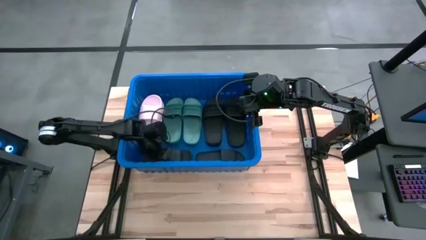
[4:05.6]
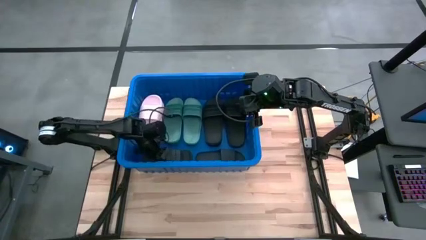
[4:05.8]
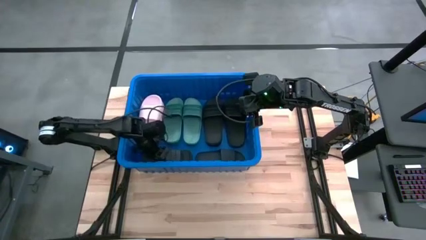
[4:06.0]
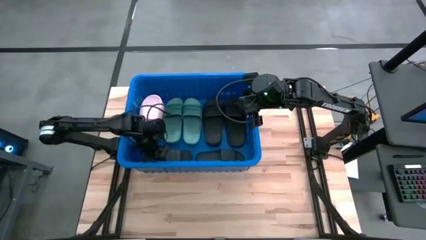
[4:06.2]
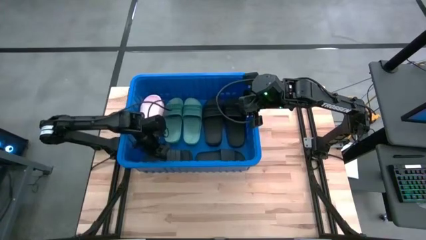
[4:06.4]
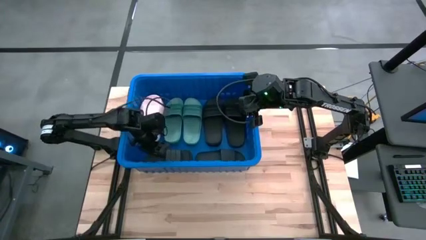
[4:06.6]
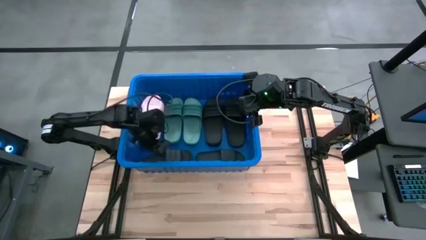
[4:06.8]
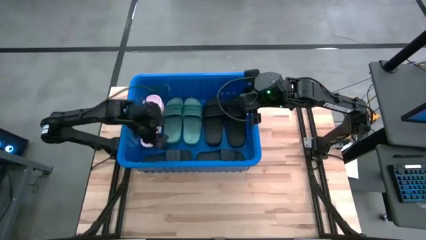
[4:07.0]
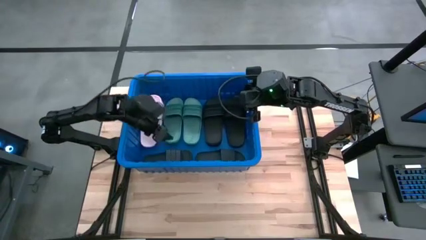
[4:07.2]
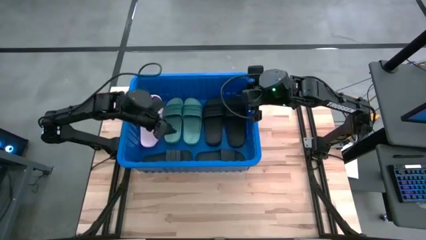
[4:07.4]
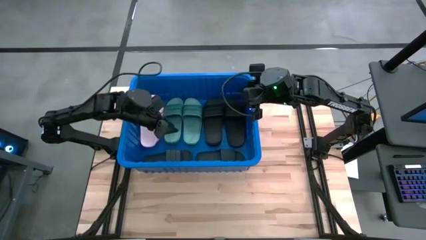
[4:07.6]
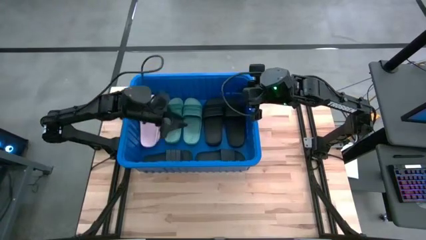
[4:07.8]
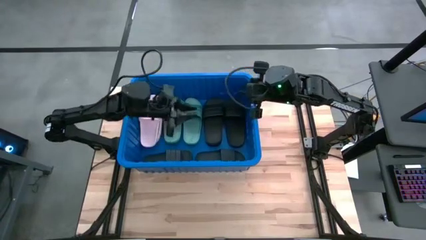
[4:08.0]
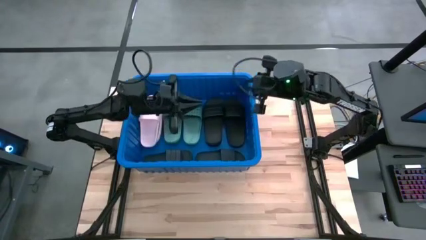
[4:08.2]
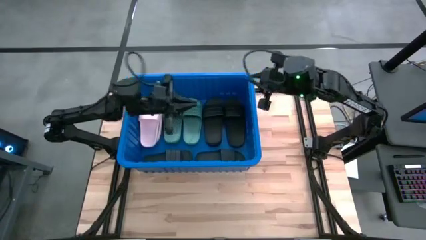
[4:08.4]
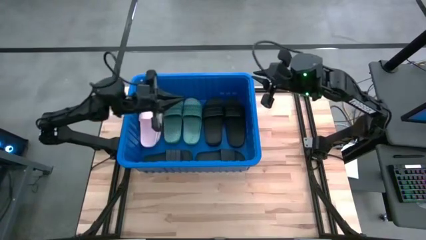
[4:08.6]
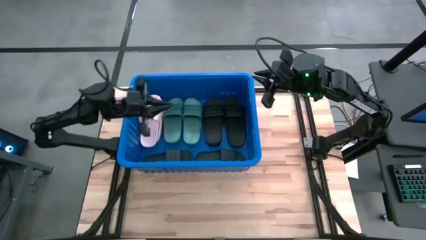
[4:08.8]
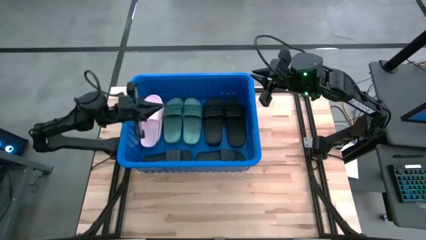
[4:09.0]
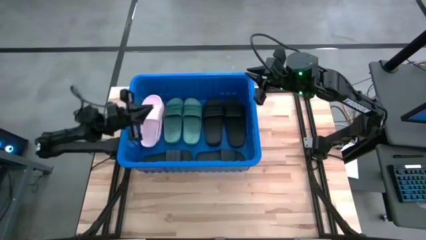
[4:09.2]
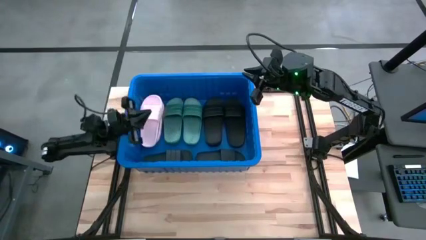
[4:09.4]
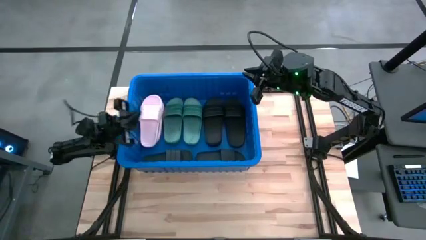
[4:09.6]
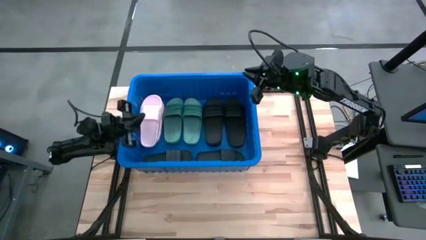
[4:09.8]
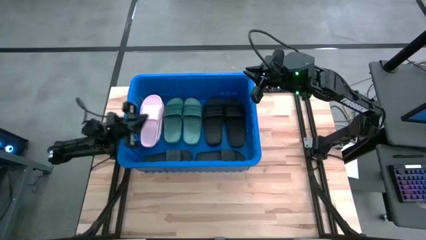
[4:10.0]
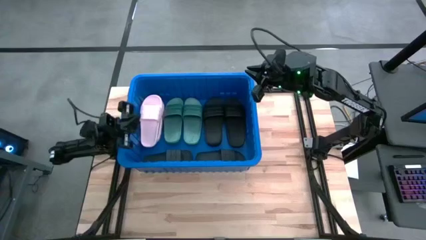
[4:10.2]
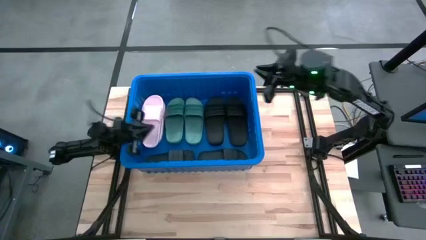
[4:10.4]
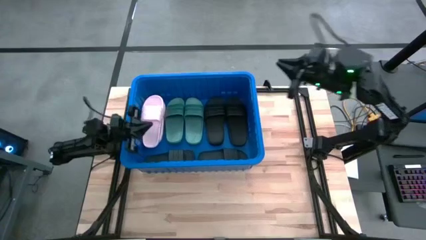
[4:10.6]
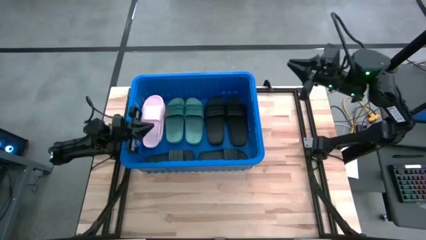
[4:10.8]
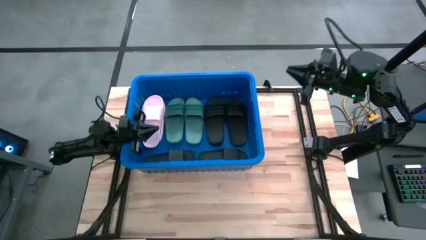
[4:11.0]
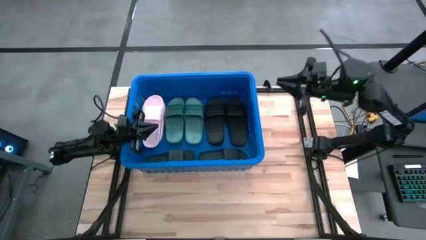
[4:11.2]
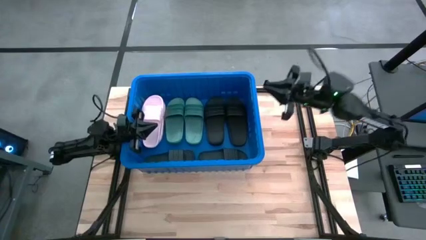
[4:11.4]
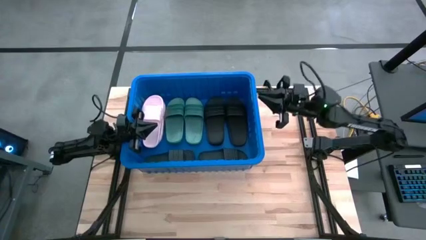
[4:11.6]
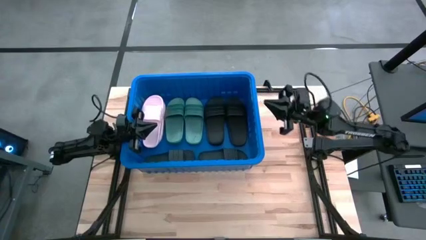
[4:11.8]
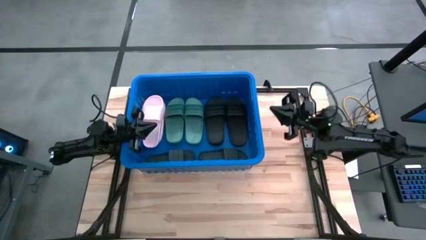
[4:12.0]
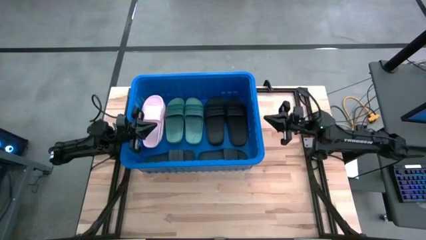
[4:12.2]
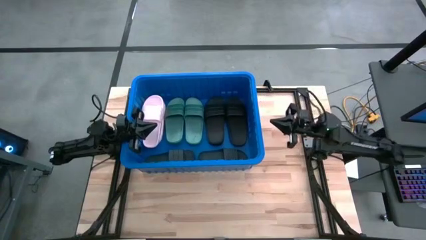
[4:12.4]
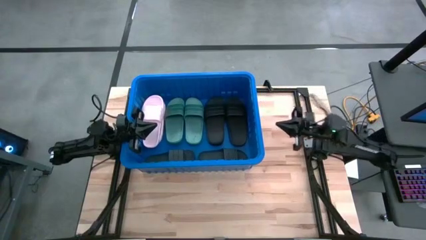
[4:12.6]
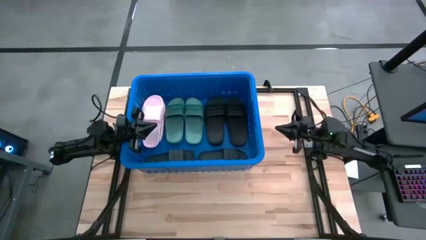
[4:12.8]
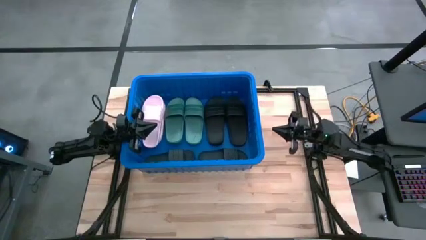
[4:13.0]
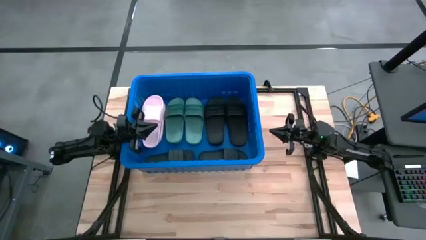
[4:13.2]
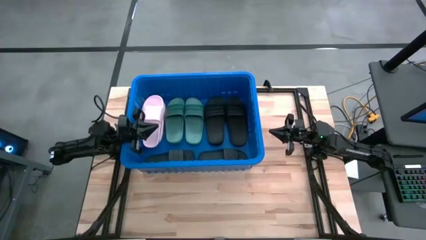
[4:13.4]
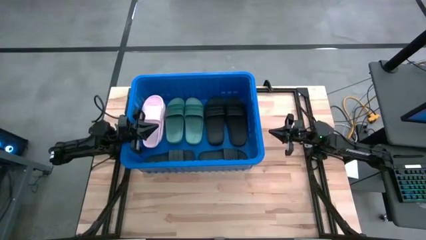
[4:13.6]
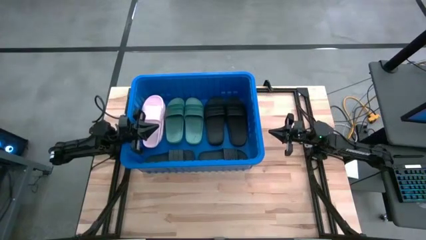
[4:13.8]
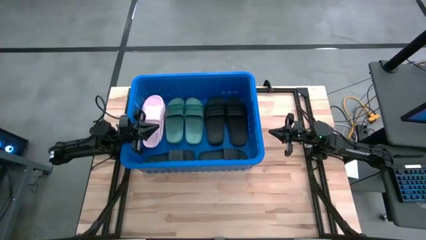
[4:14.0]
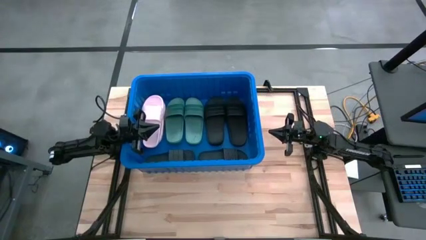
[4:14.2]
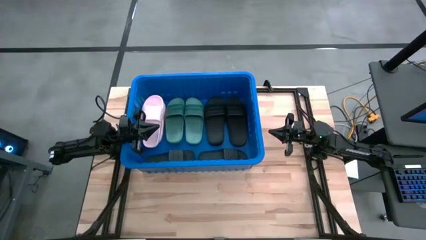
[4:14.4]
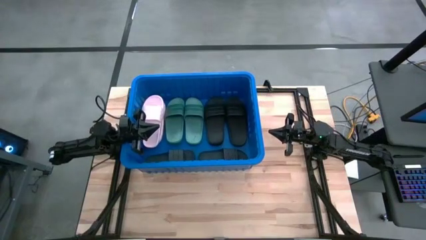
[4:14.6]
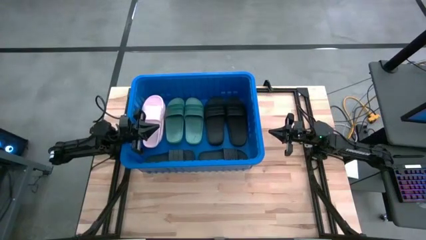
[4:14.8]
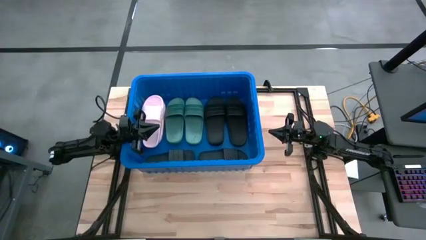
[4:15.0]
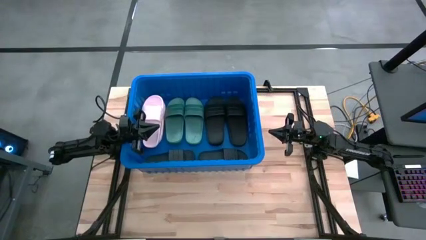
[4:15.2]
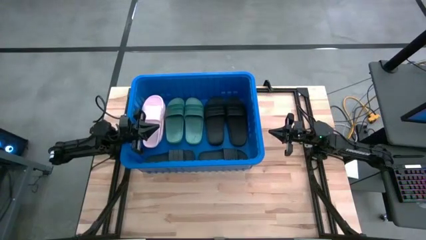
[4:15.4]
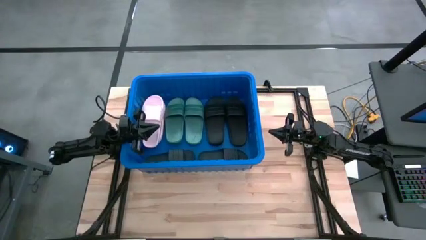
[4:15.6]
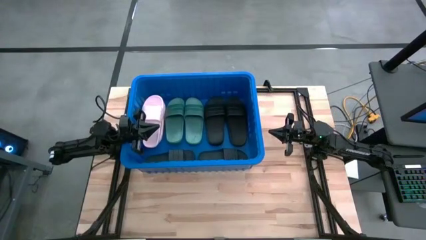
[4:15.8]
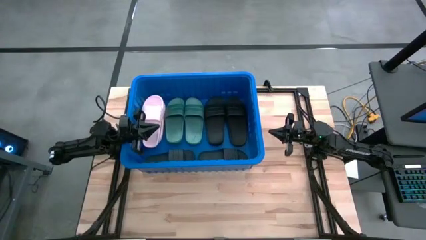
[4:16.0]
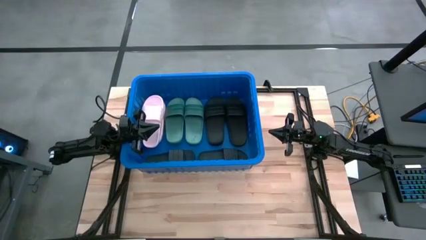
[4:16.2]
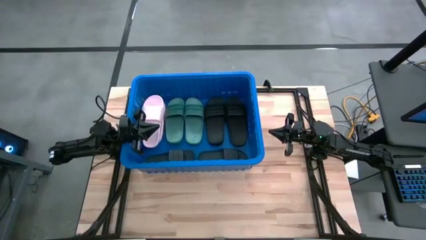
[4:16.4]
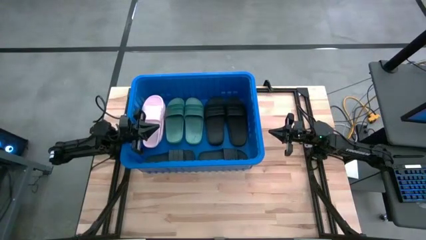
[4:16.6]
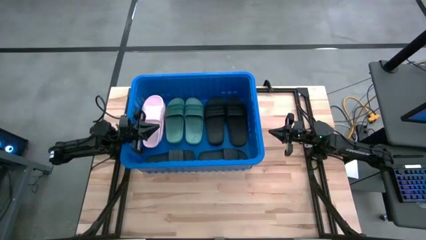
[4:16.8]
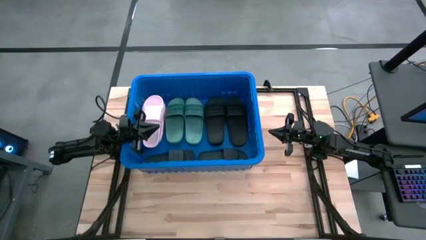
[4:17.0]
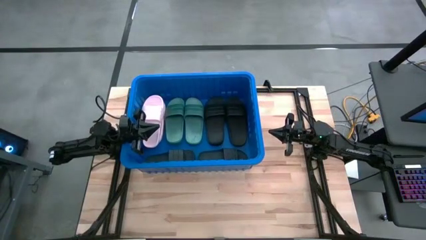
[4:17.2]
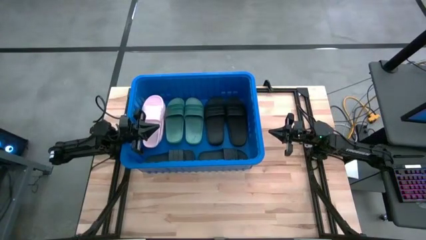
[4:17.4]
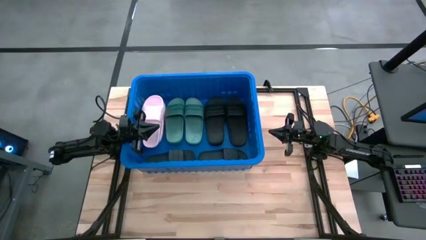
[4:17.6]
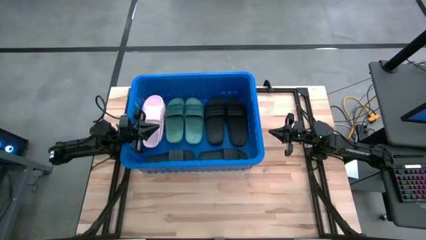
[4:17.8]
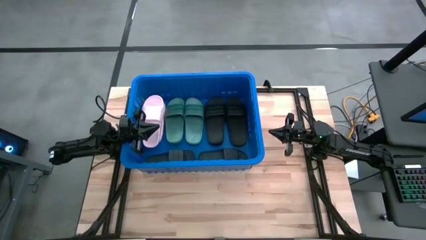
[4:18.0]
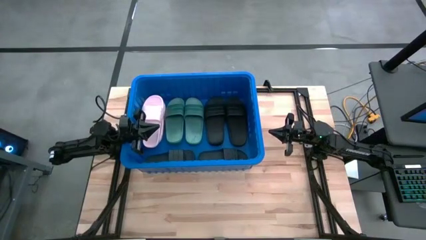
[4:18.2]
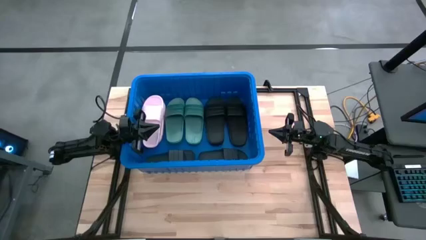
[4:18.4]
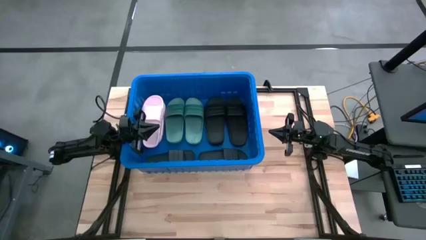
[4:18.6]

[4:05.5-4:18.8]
Task: Pick and place slides into bin
Return to Home Position

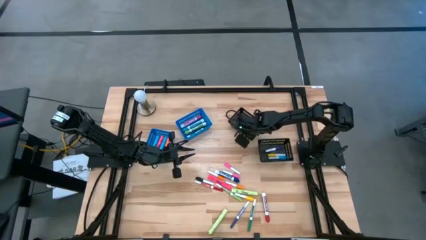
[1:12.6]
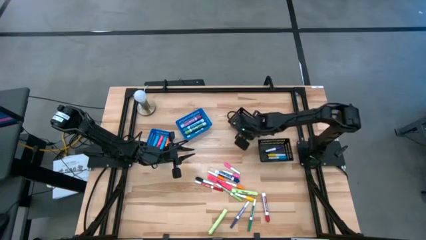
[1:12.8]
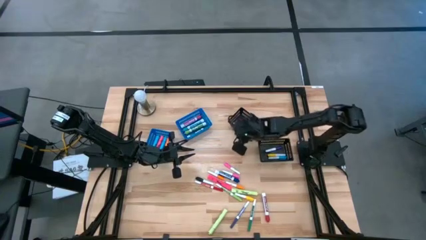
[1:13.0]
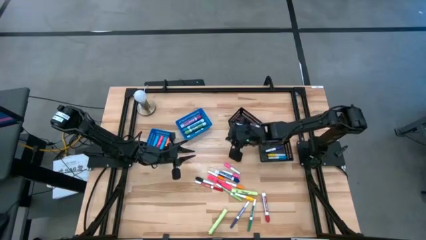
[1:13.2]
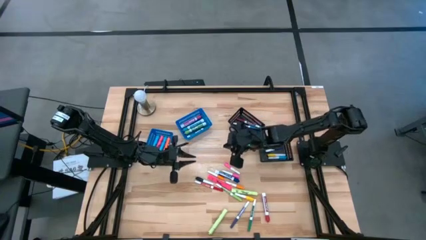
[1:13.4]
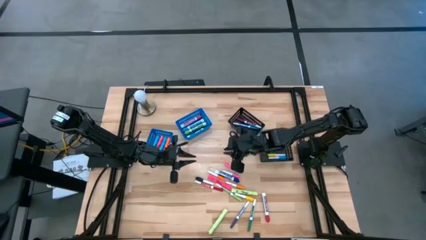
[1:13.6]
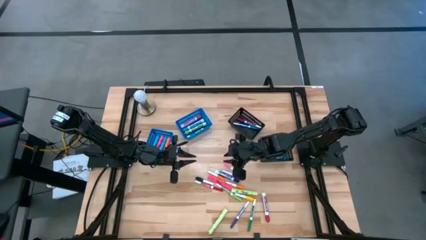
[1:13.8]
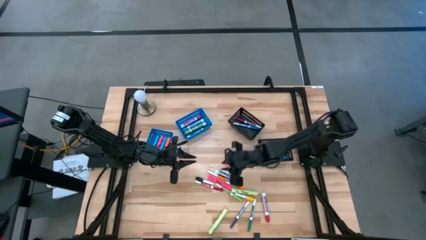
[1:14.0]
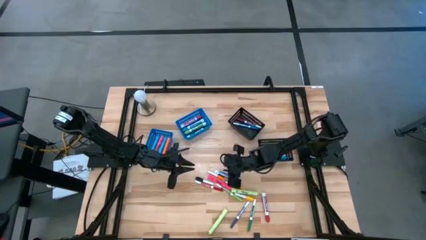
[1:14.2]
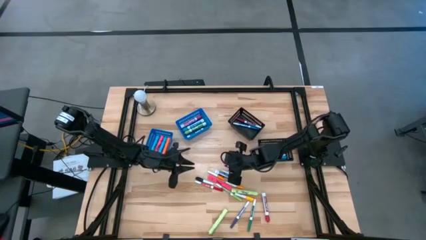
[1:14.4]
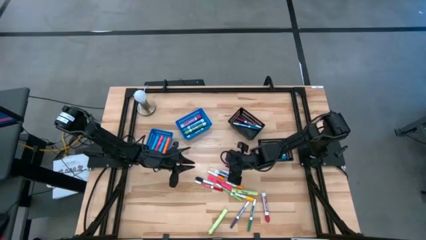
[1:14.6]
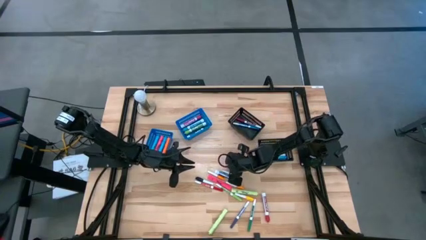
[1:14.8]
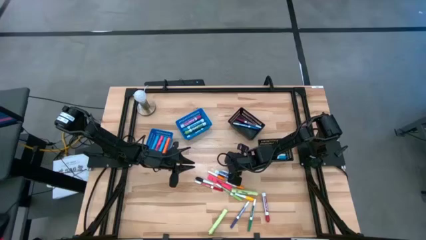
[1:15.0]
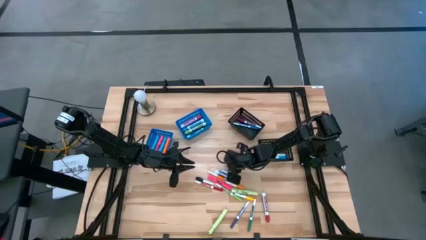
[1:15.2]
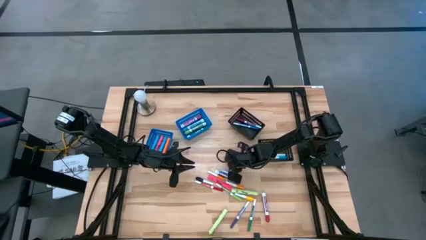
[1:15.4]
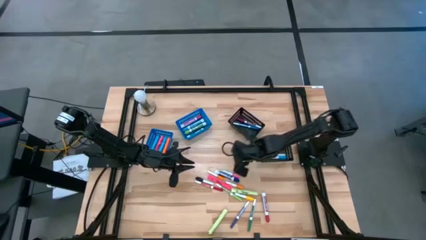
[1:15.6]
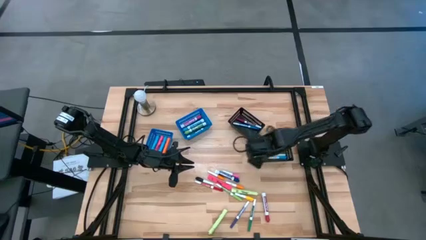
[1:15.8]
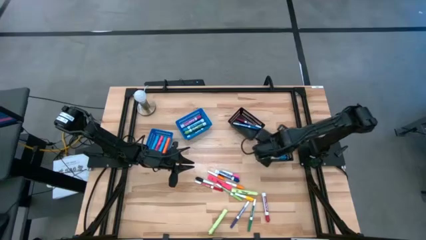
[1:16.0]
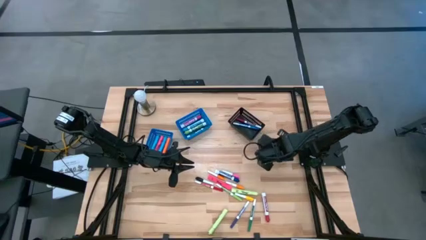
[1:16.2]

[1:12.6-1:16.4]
Task: Pick & Place Markers
Put the top pink highlighter pen into the bottom black bin
